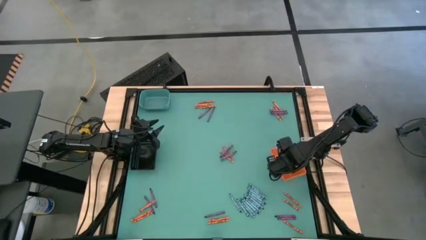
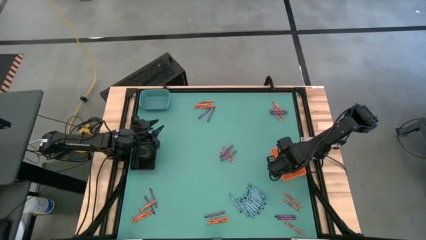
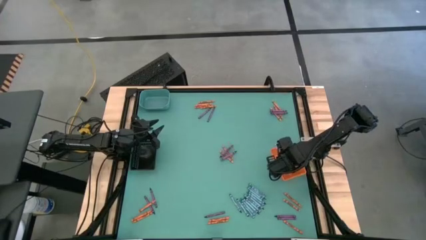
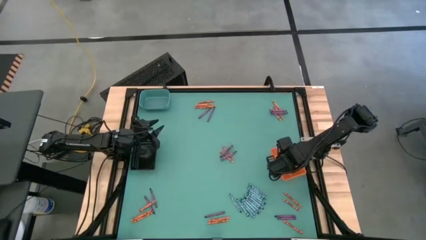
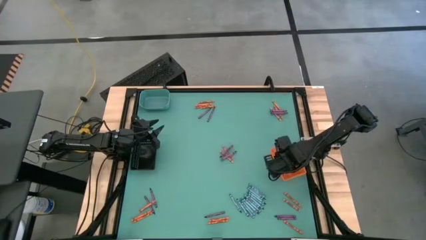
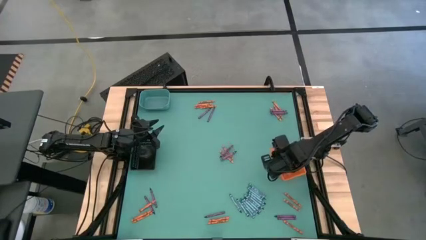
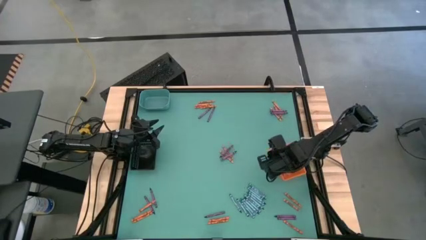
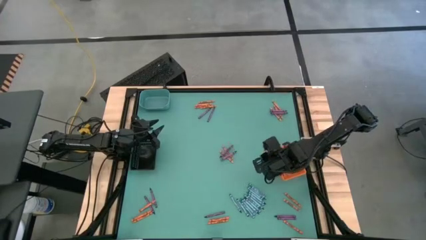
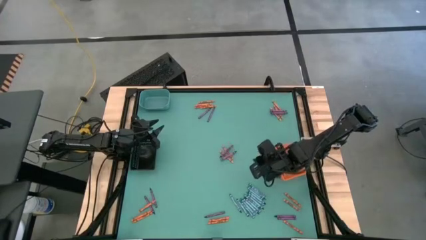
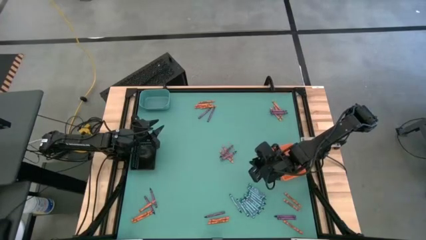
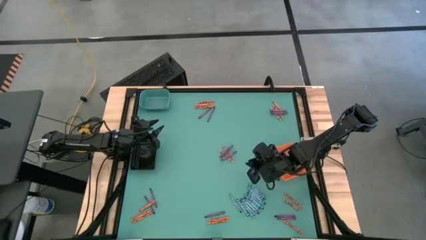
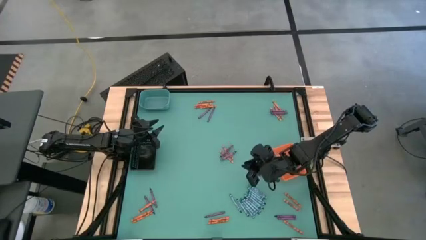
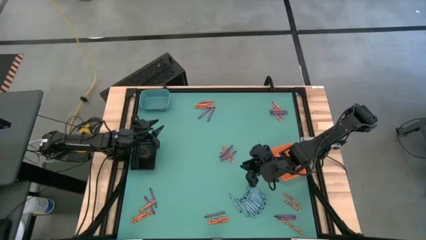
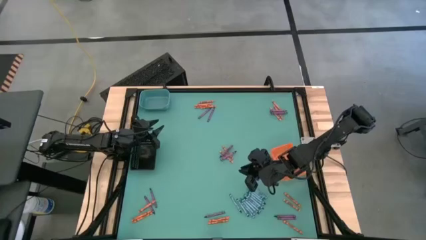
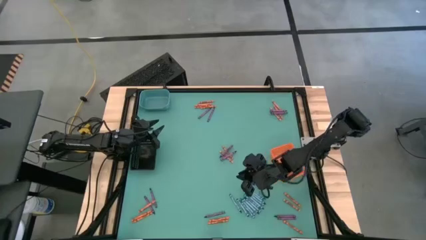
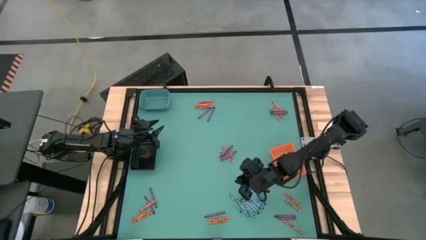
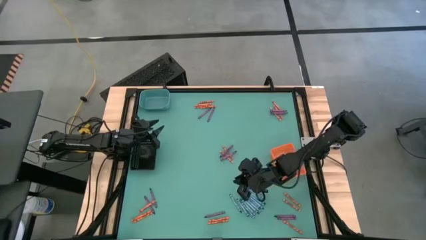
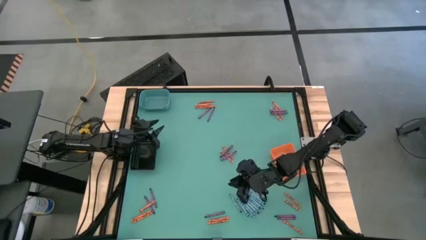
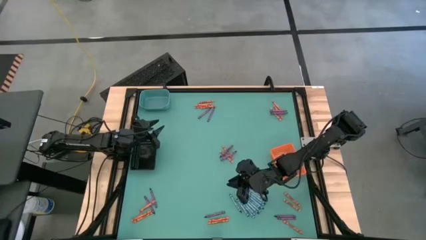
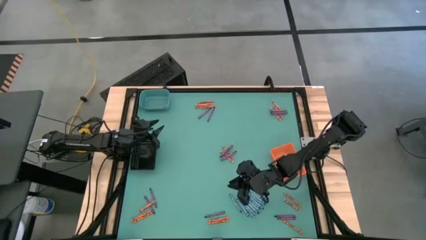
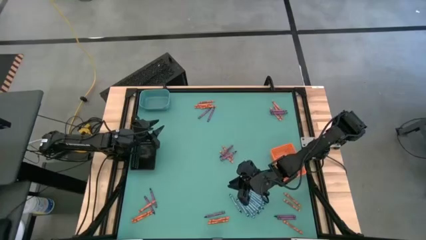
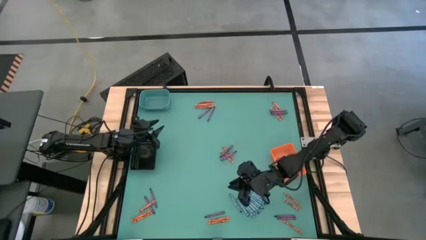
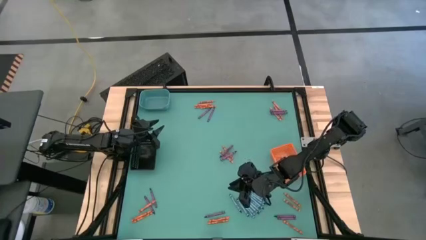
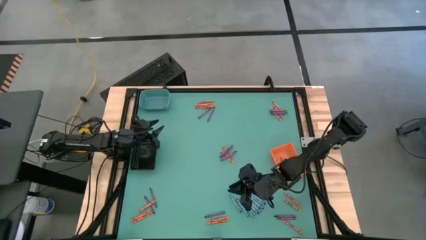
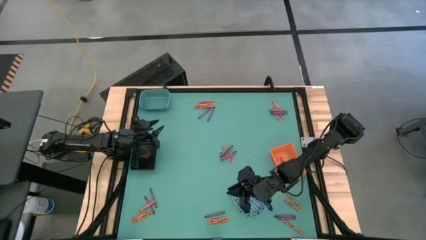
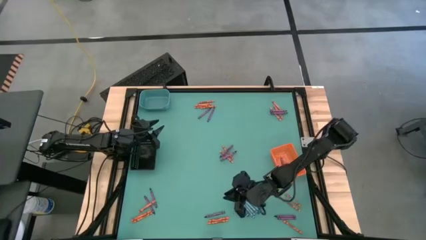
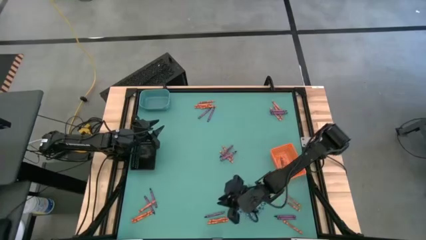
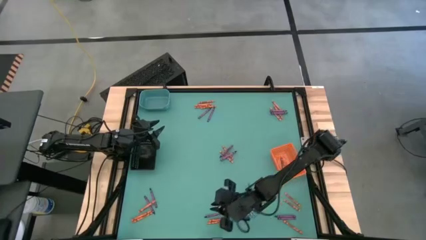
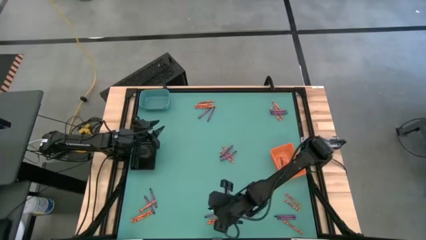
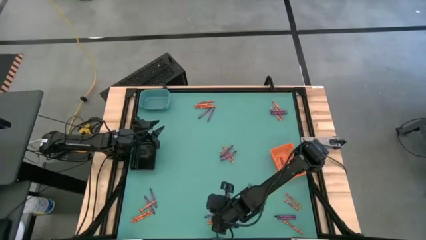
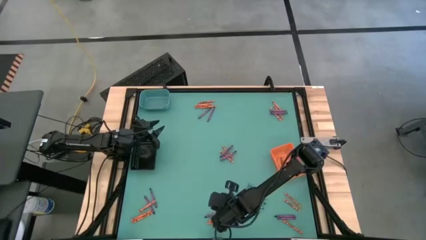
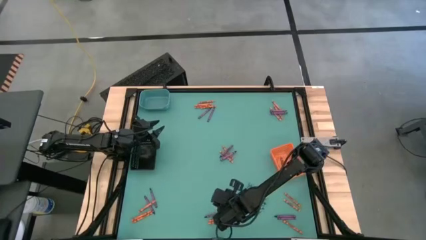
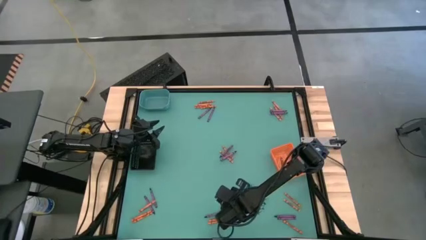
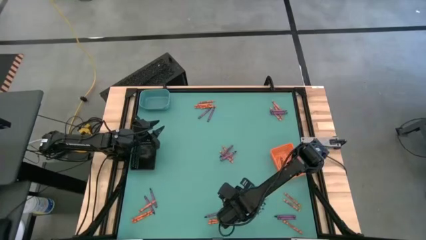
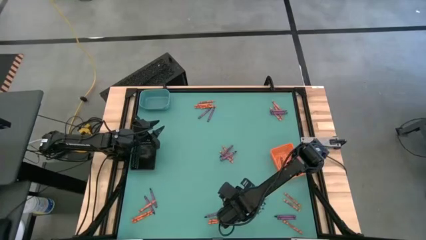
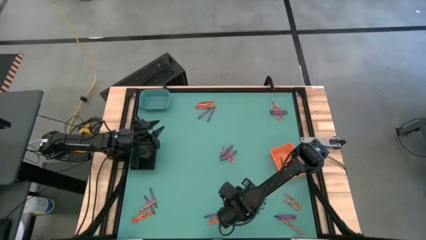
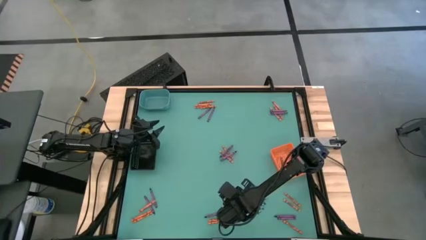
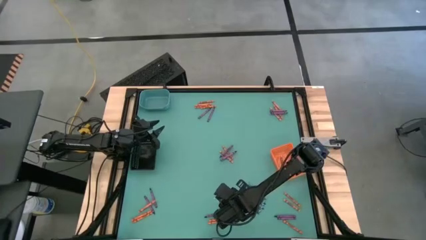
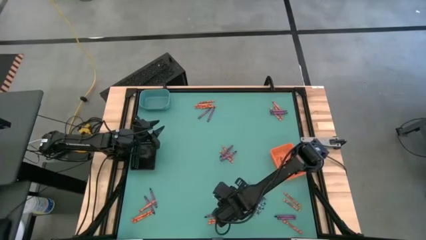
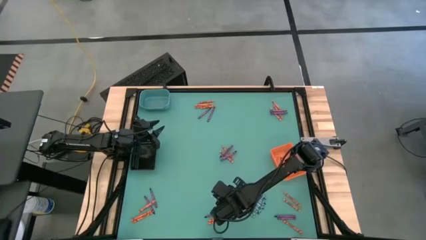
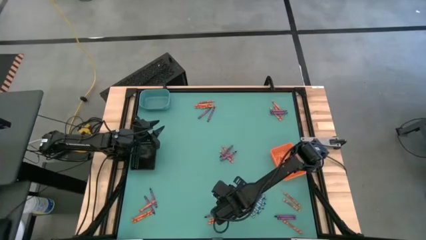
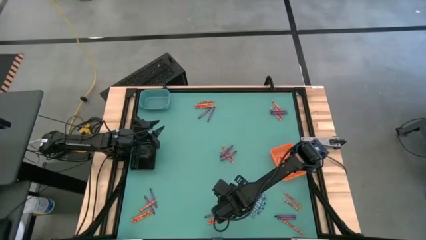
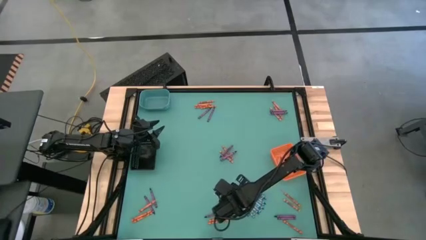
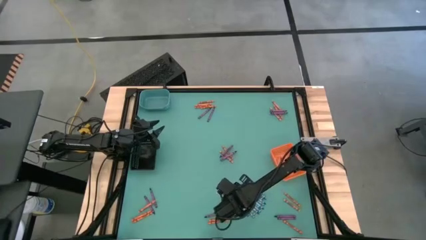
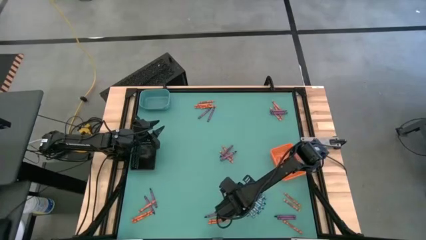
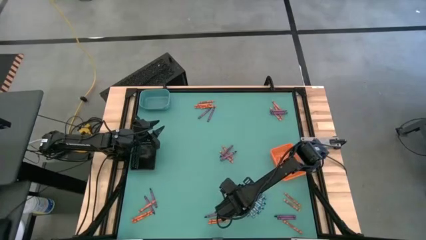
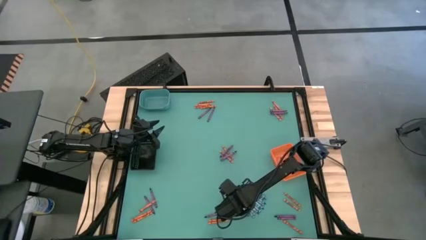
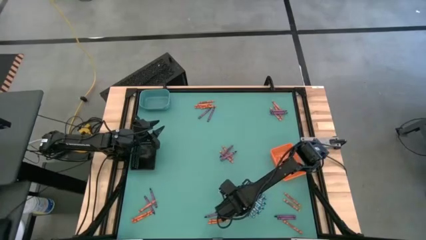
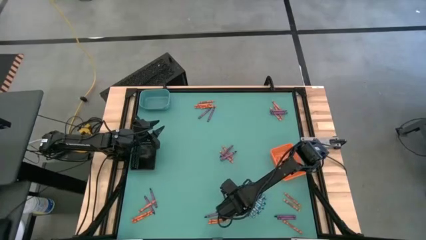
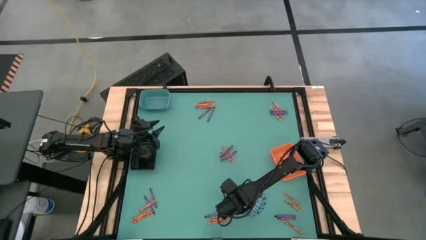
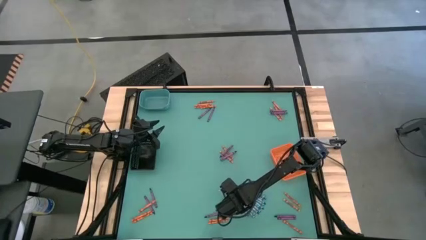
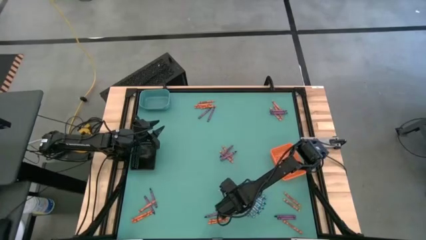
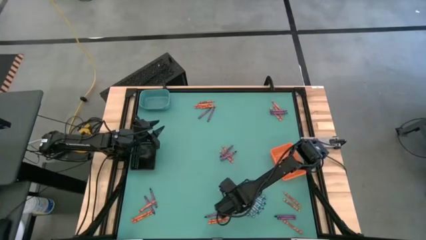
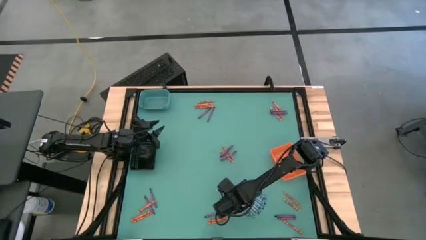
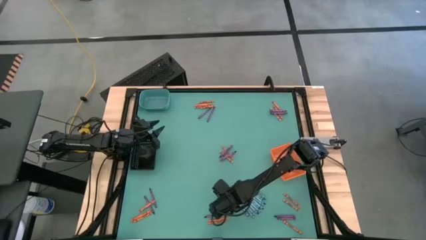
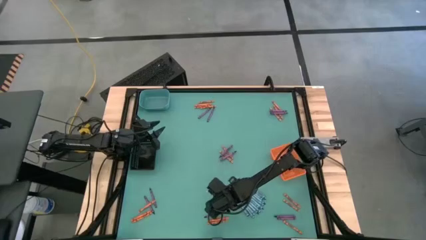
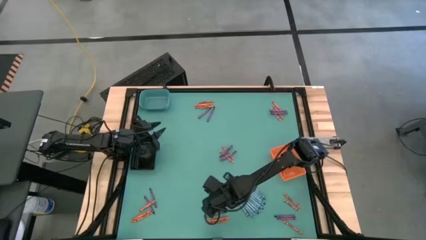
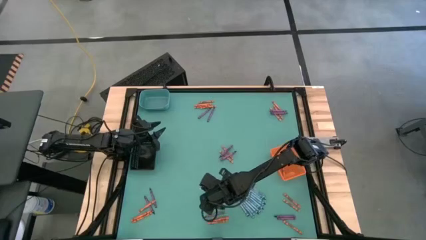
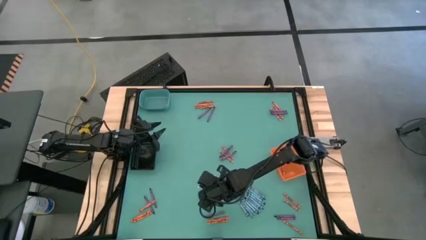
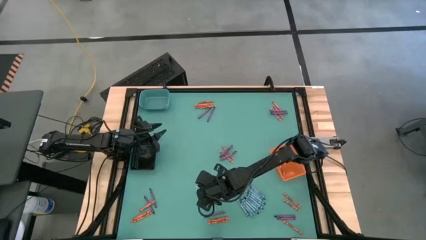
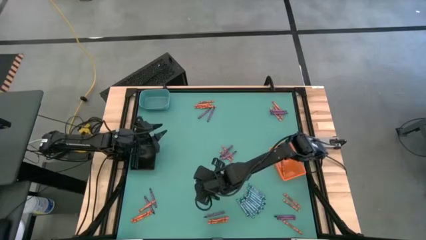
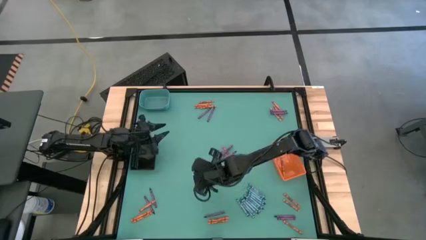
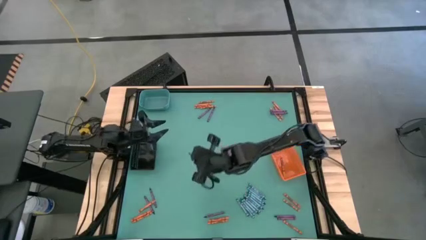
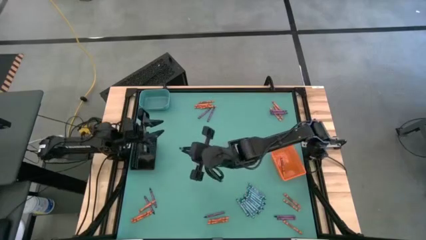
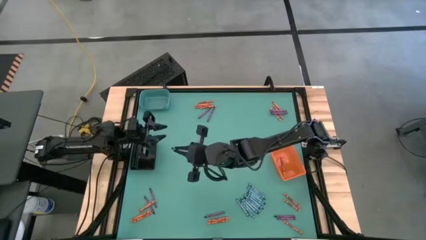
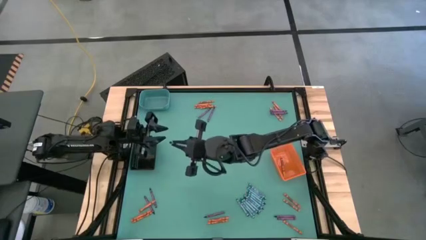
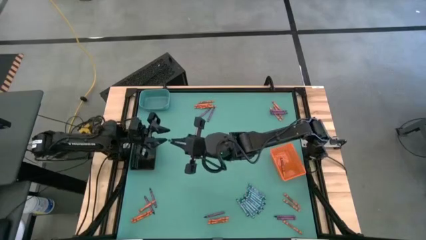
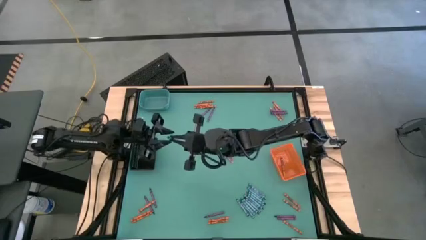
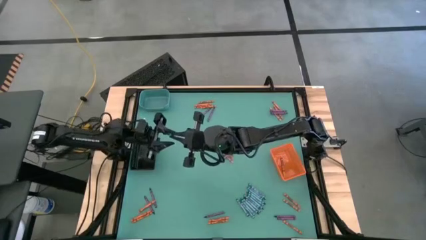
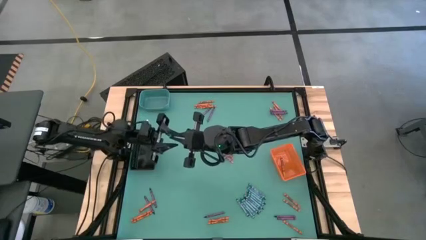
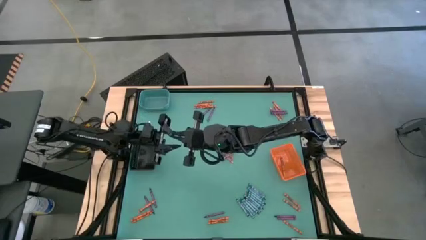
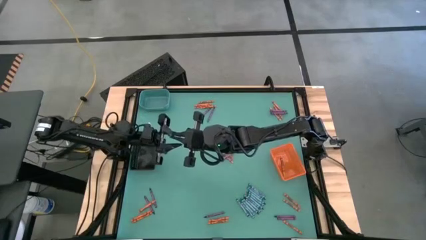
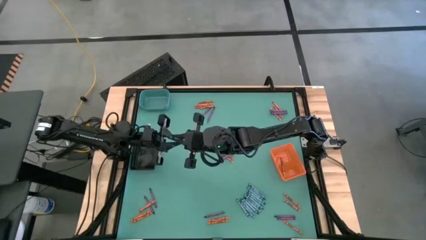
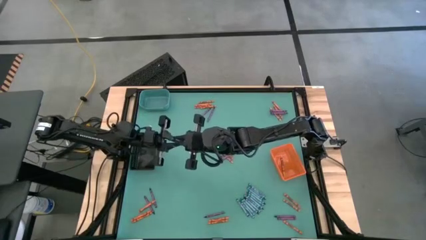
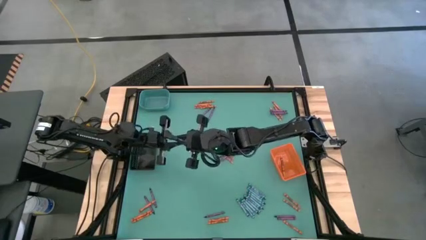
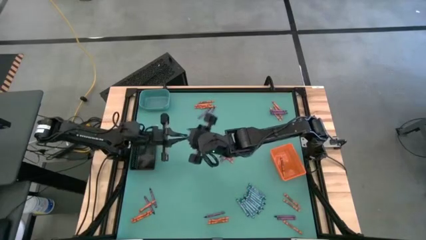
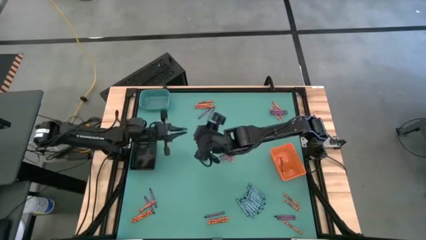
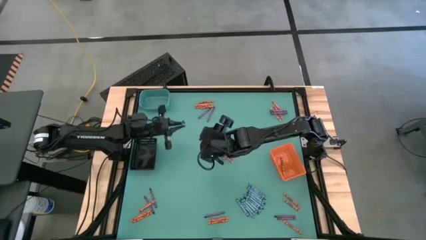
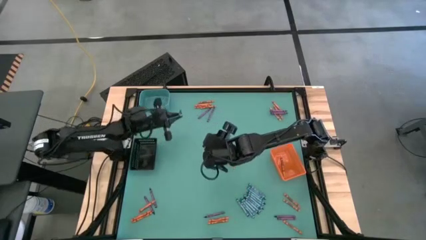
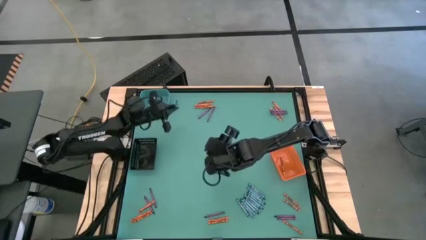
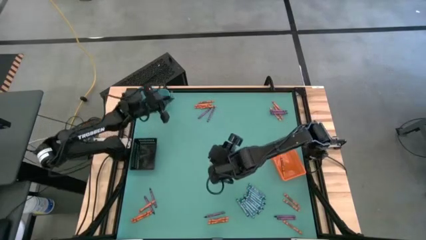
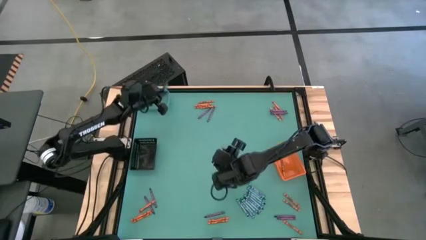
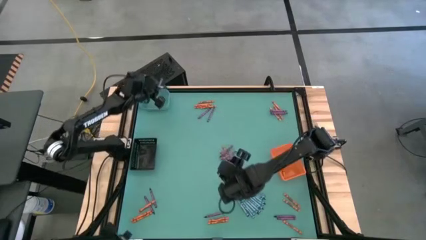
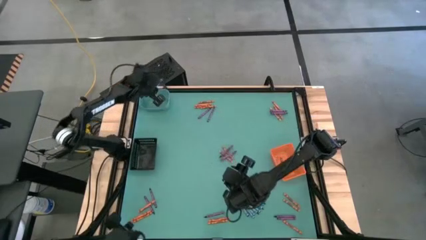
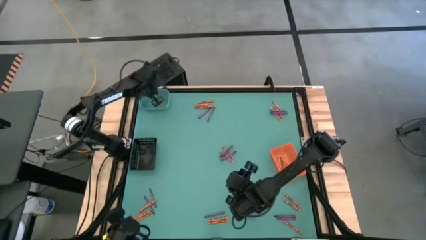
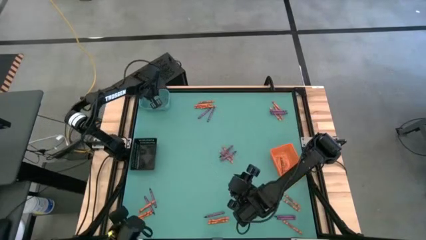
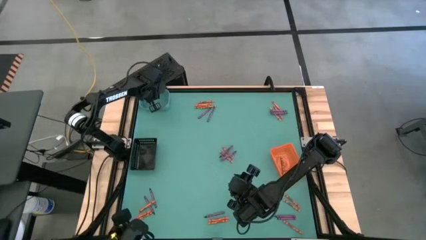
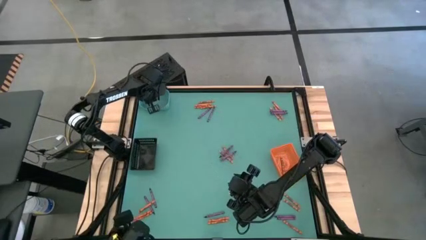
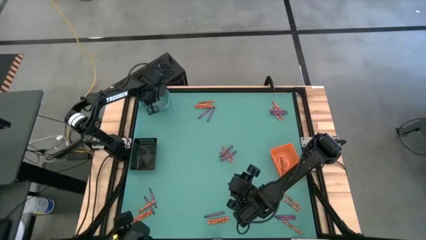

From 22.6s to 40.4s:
Task: Sort crayons
Put the blue crayon into the green bin
